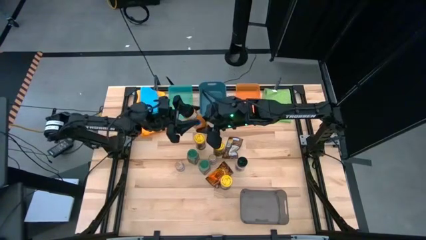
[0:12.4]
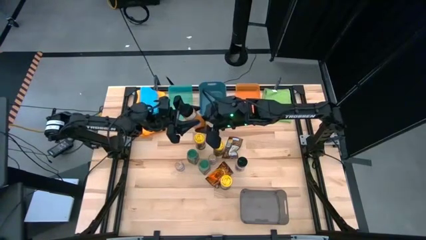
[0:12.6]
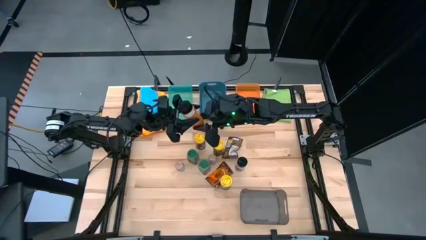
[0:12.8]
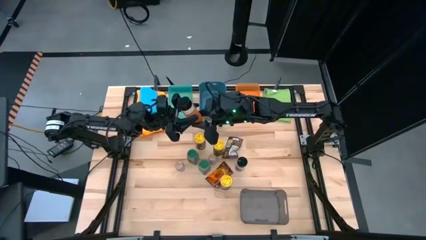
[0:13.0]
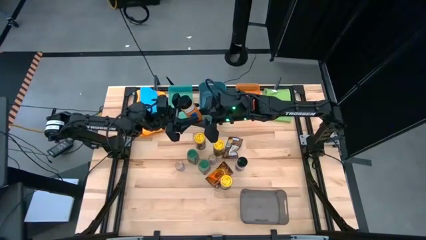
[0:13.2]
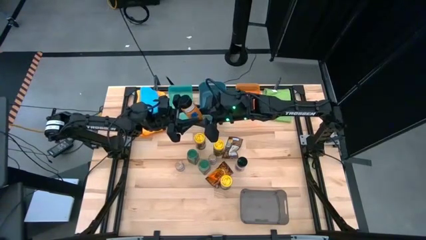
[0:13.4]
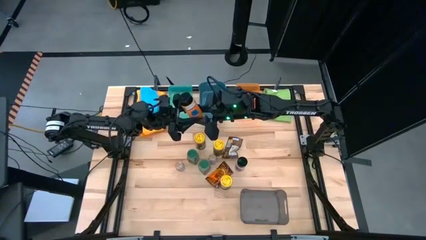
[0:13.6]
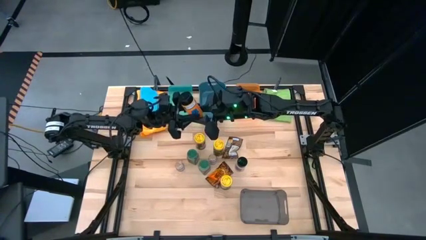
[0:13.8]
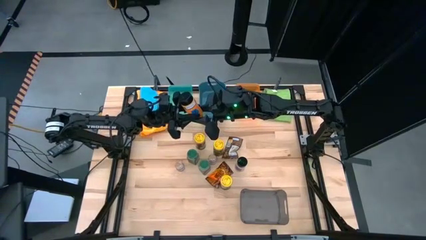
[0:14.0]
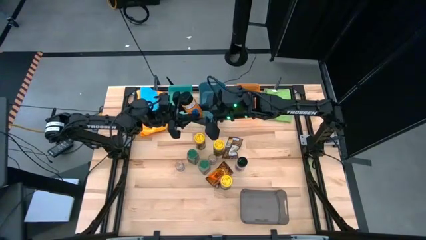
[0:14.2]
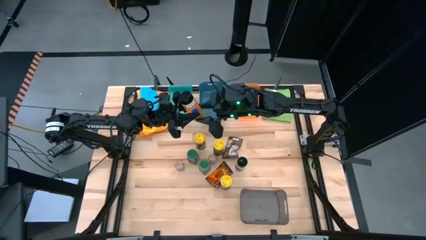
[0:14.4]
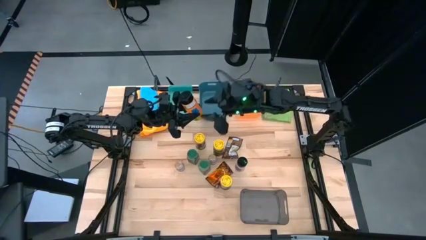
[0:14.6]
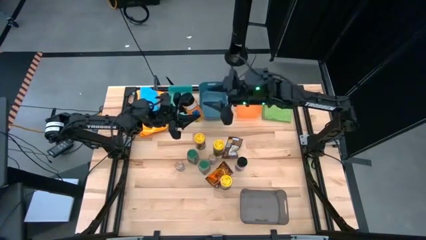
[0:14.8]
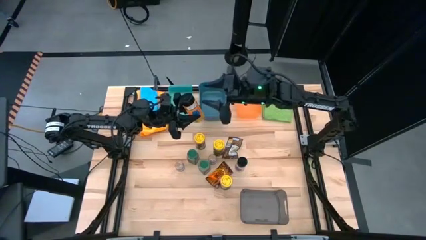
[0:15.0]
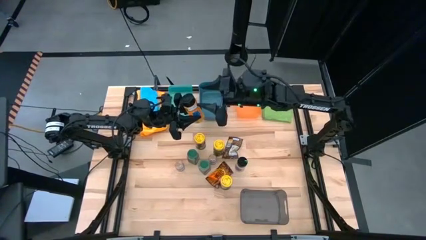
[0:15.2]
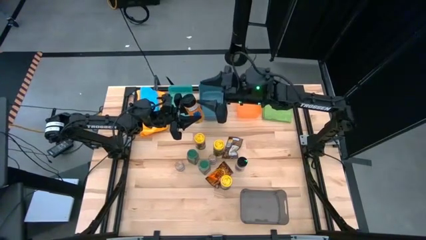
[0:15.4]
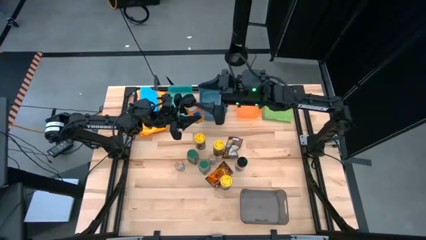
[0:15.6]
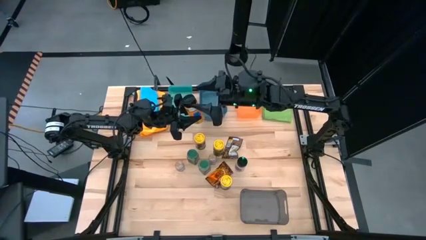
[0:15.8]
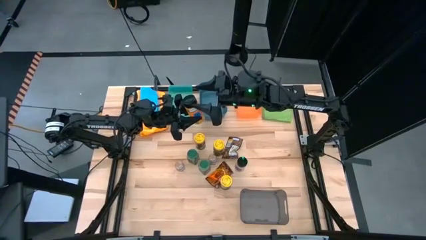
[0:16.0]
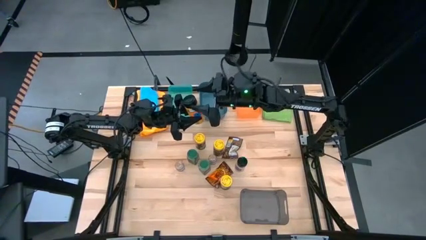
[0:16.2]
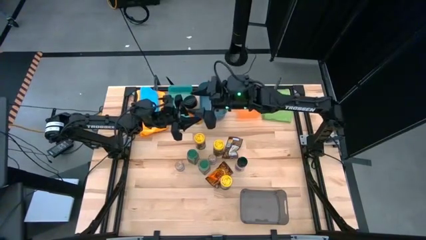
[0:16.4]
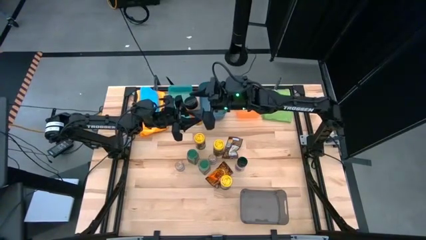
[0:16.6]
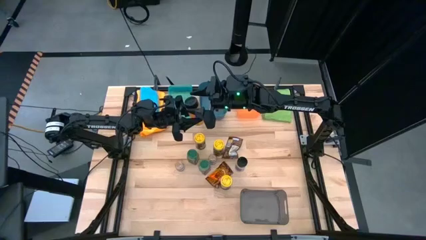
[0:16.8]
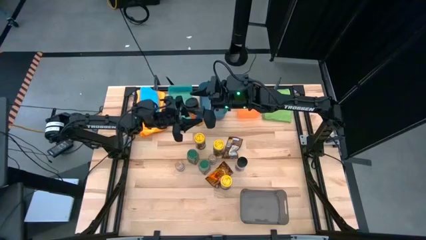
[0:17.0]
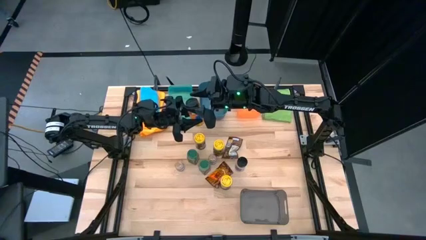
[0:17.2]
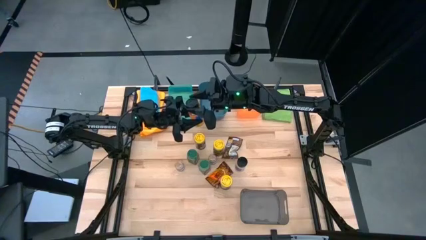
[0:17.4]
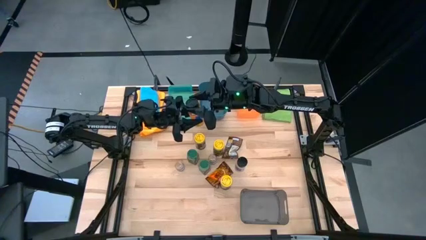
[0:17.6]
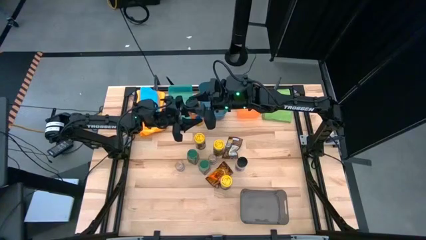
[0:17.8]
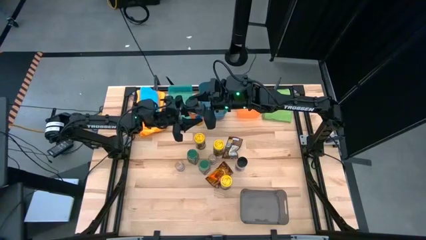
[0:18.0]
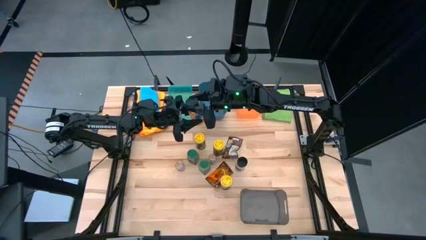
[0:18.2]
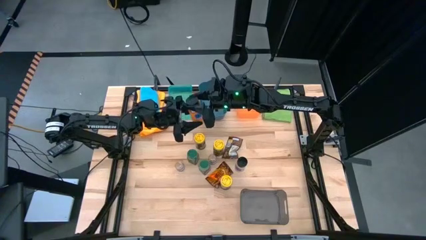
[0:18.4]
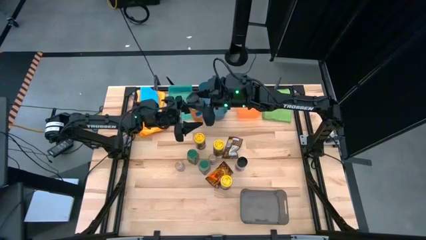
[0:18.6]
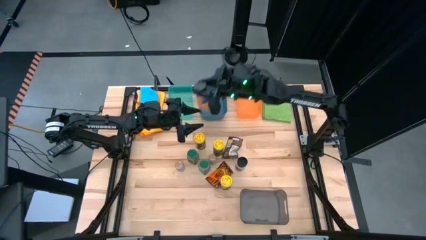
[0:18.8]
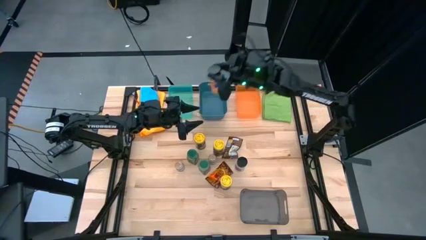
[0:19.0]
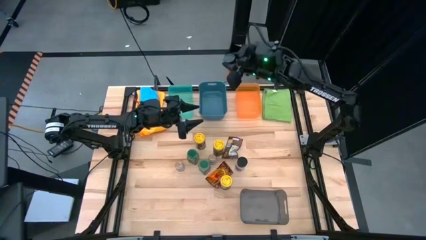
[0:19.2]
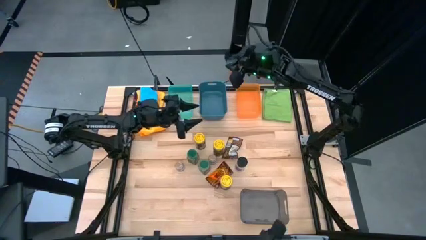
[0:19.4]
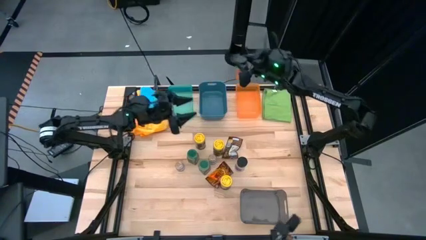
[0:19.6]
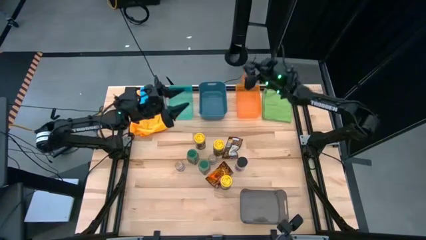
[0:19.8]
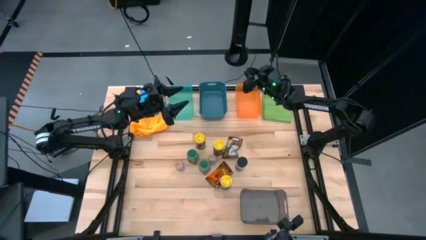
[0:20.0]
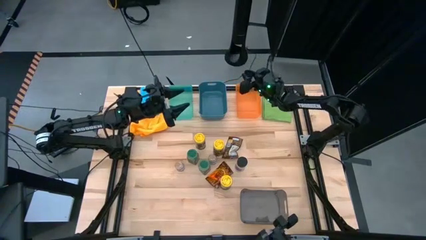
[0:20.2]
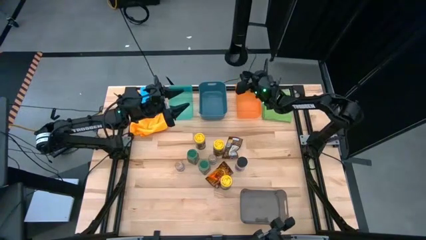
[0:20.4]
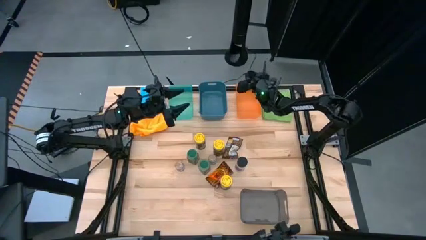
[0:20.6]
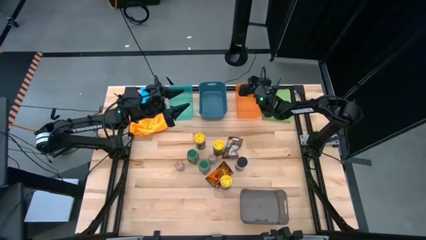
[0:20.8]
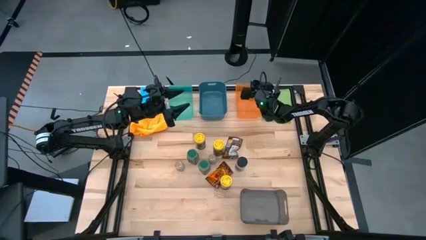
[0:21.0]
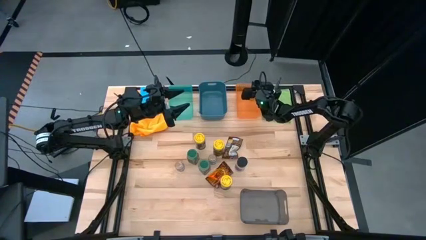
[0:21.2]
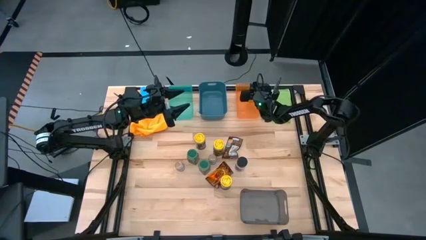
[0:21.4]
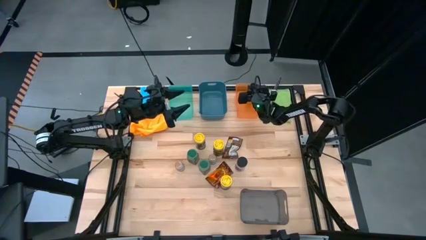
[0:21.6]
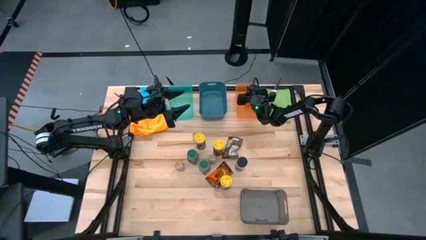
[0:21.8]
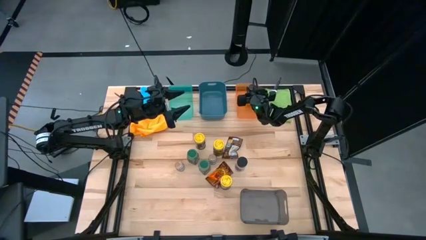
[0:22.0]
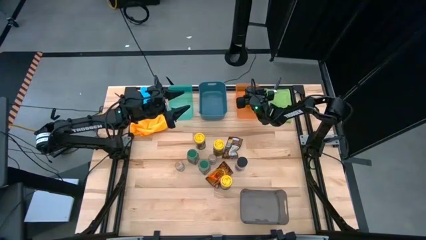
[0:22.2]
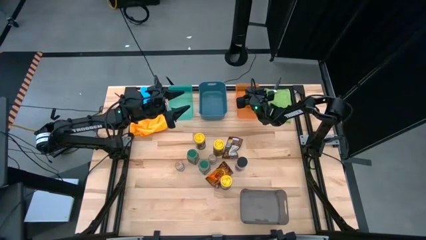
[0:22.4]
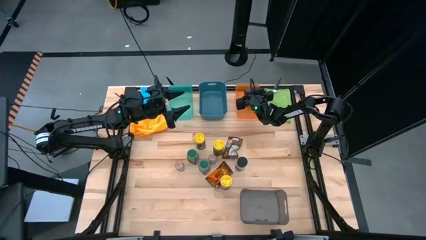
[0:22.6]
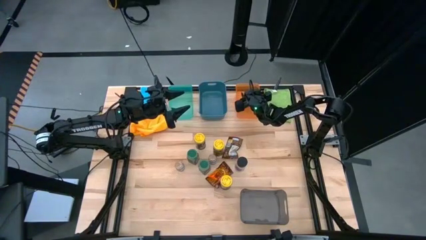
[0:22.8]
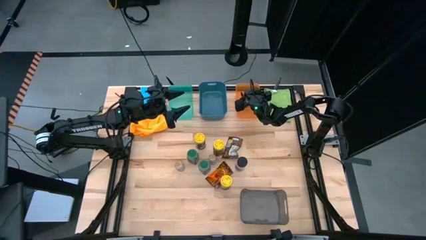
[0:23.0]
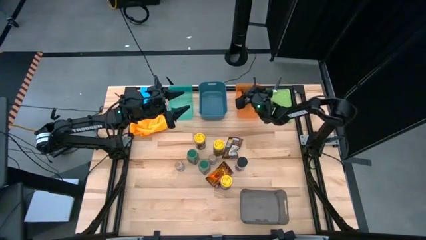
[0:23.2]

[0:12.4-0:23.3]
Task: Sort spices by type
Put the right black seasoning bottle into the orange transparent bin

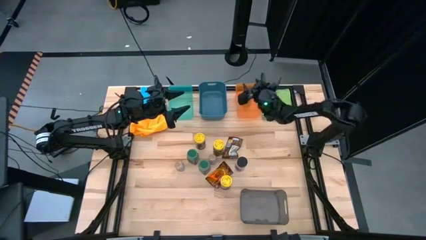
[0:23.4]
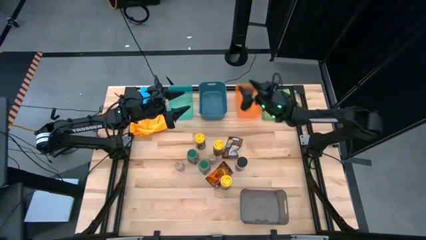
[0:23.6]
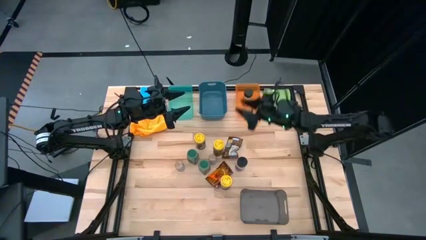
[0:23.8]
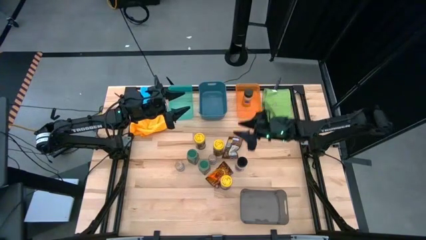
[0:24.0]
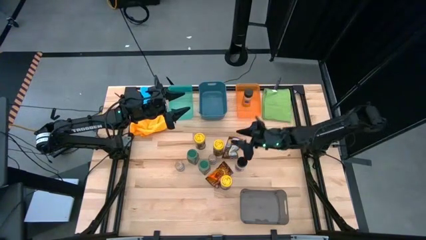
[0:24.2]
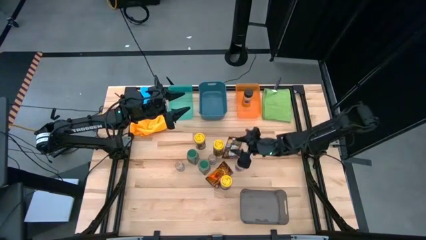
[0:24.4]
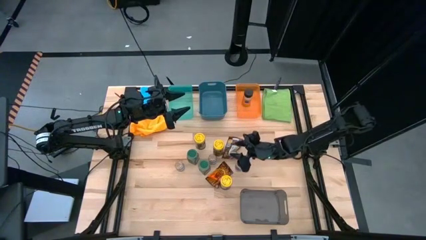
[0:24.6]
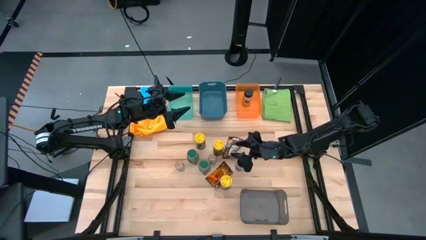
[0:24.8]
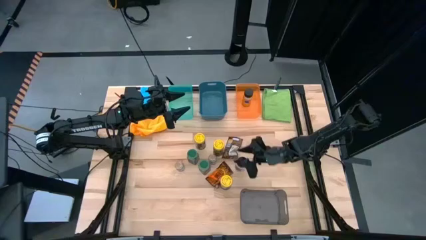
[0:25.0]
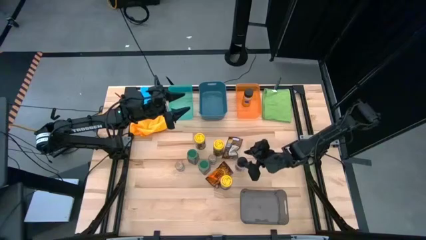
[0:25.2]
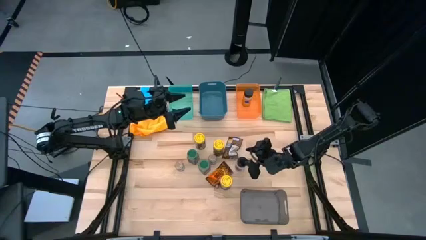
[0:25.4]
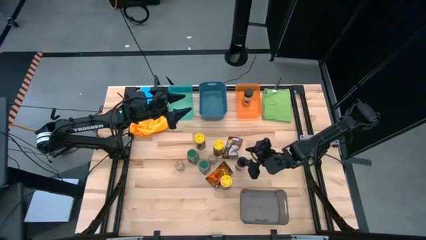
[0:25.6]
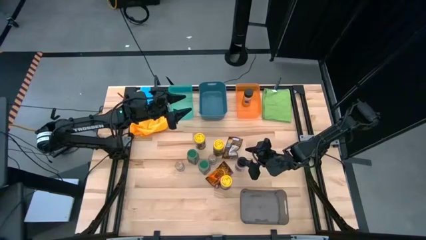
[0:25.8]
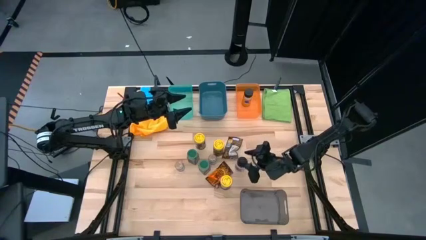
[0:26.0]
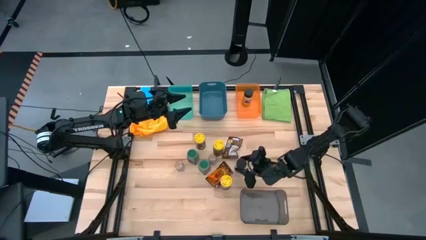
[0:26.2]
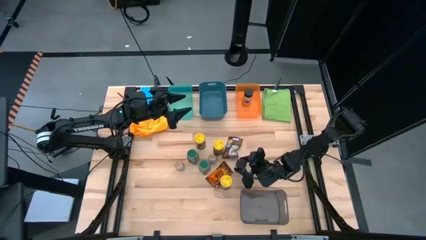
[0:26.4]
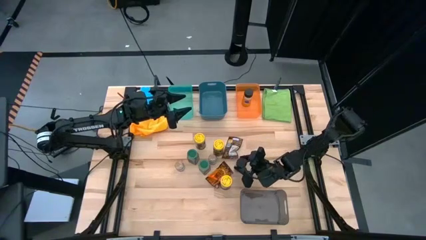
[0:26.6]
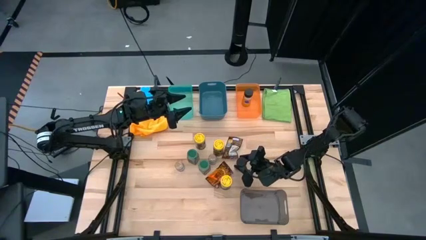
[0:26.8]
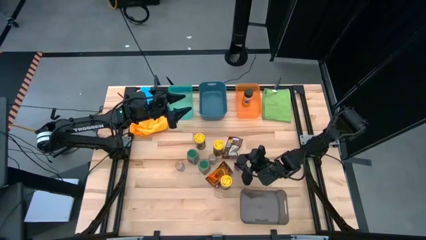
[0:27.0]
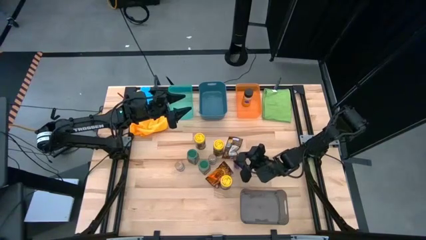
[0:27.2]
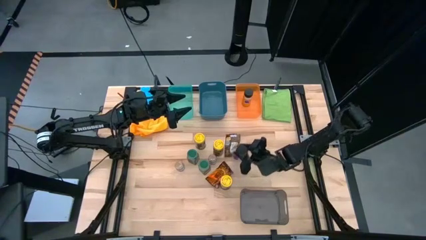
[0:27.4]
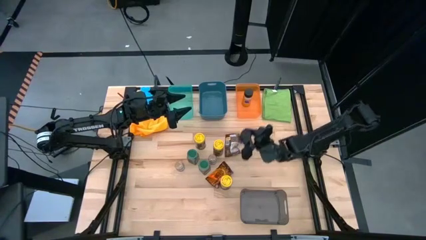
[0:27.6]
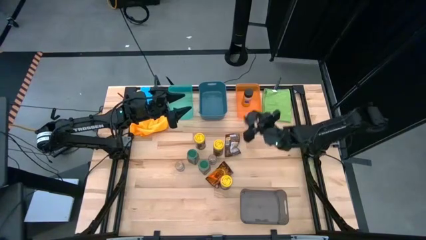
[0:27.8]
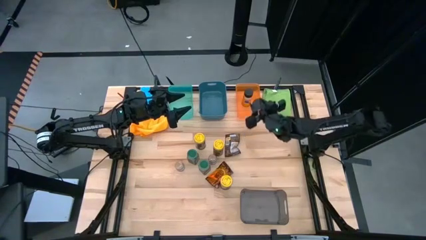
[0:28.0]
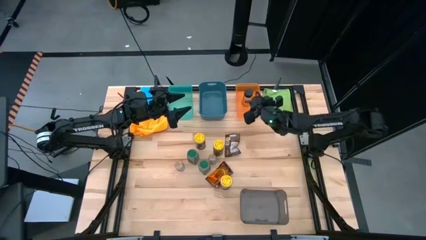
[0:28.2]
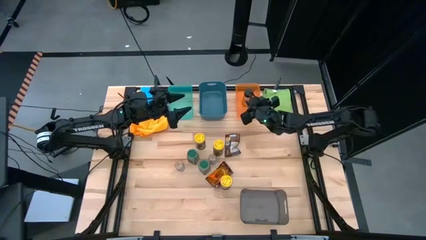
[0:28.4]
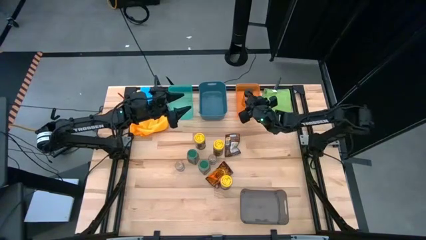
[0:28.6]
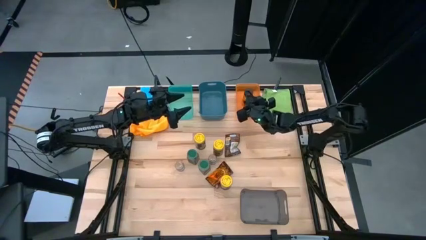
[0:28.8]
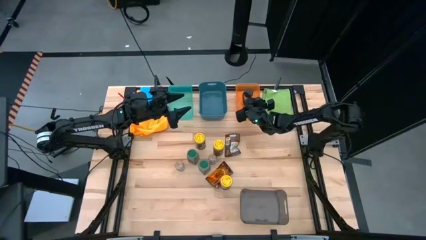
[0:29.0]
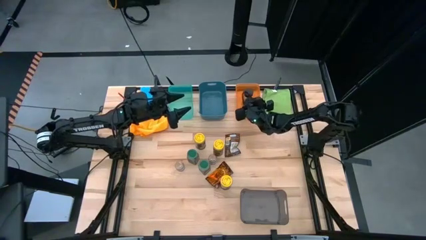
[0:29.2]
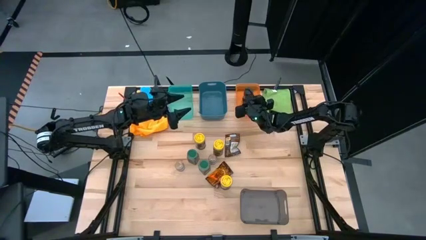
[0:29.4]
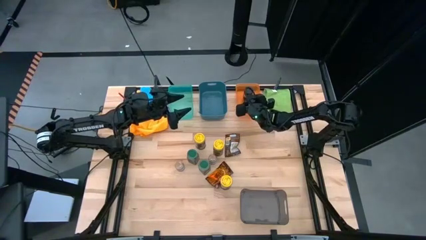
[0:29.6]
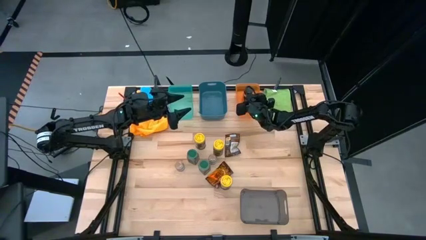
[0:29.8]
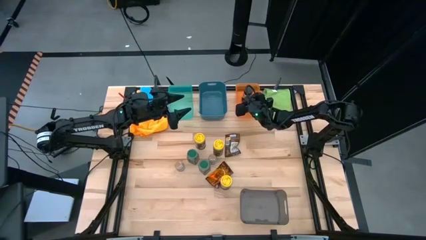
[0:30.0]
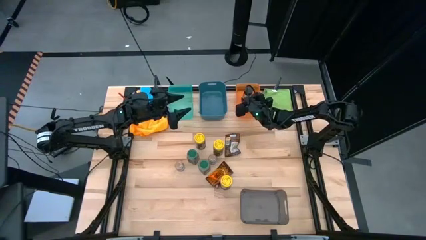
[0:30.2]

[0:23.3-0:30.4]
Put the black seasoning bottle into the orange transparent bin
